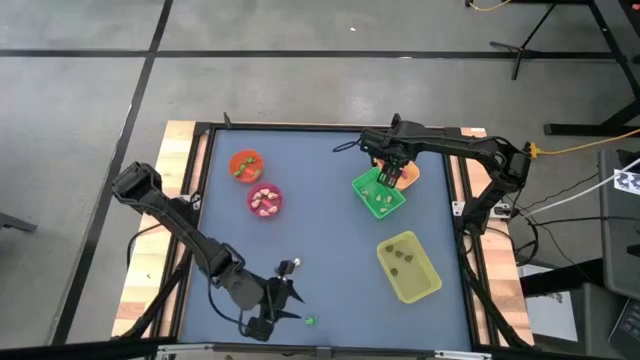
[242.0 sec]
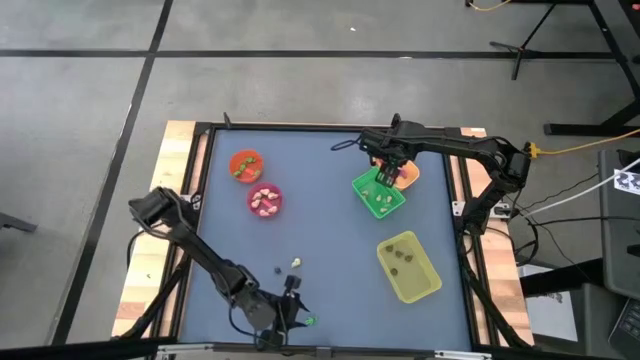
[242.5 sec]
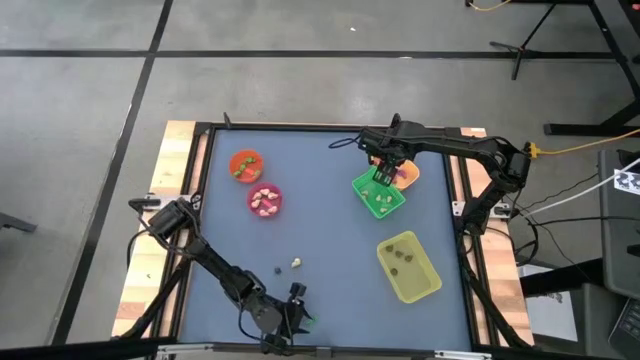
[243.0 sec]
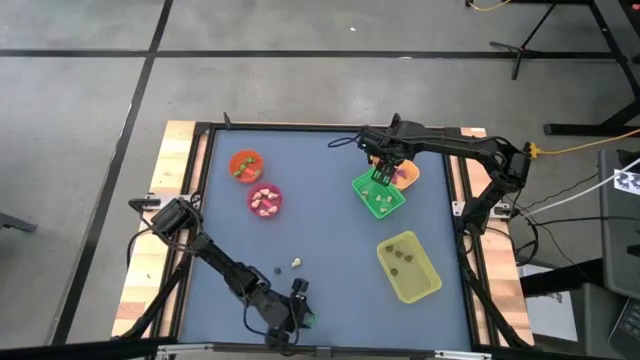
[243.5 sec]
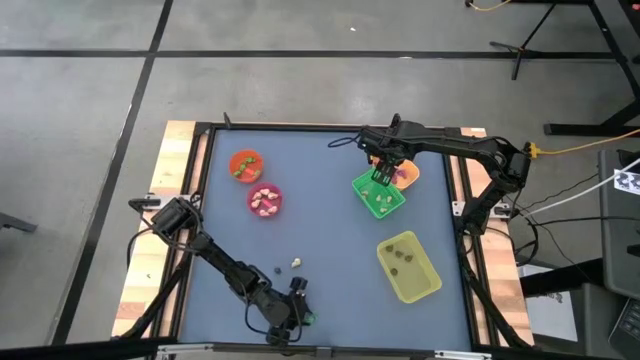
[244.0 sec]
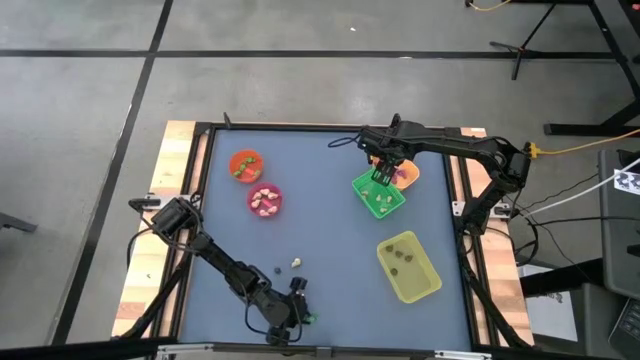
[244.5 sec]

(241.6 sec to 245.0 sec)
Task: Sort Halloween decoration
Put the green skeleton toy into the orange bin

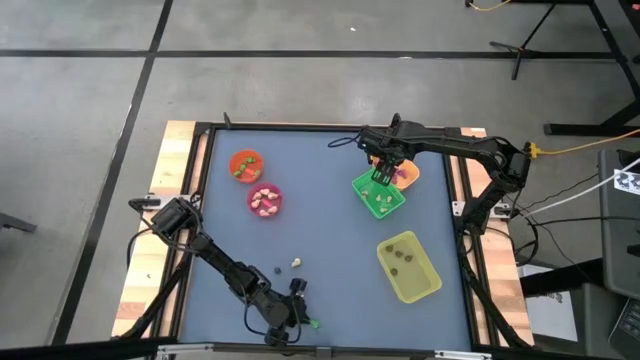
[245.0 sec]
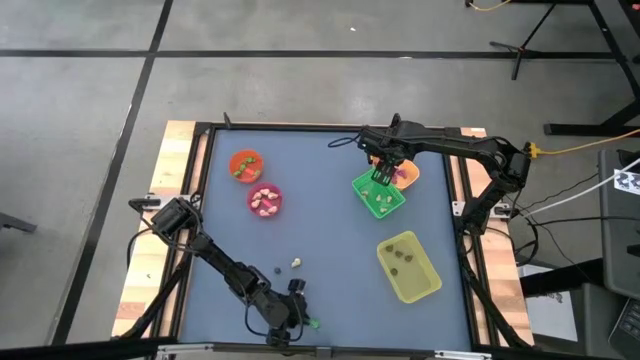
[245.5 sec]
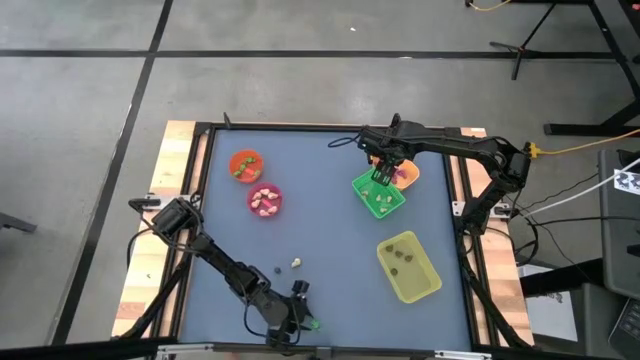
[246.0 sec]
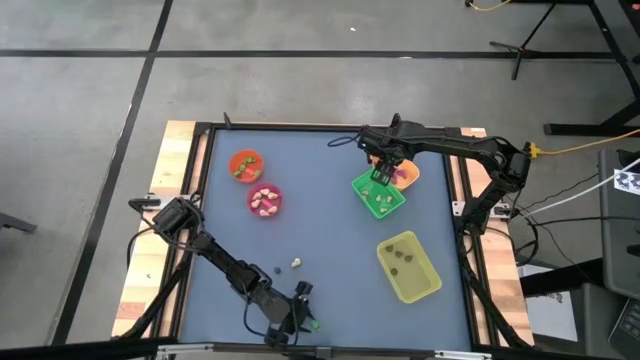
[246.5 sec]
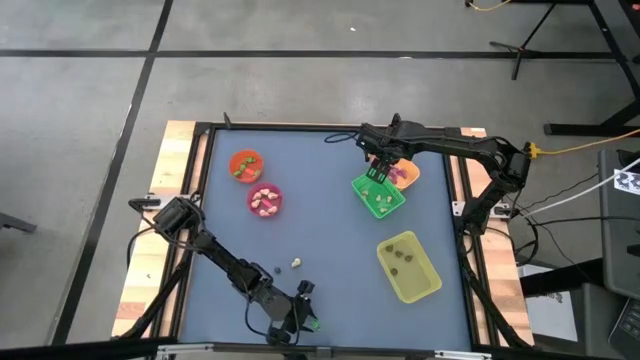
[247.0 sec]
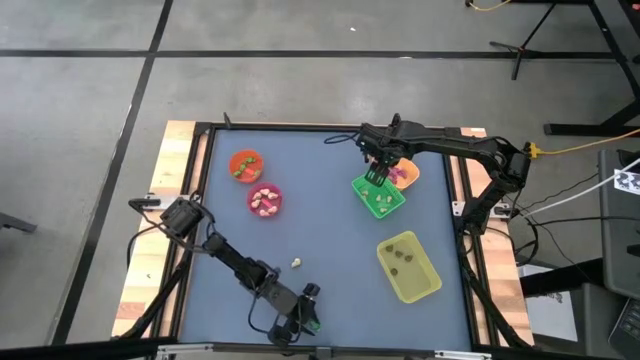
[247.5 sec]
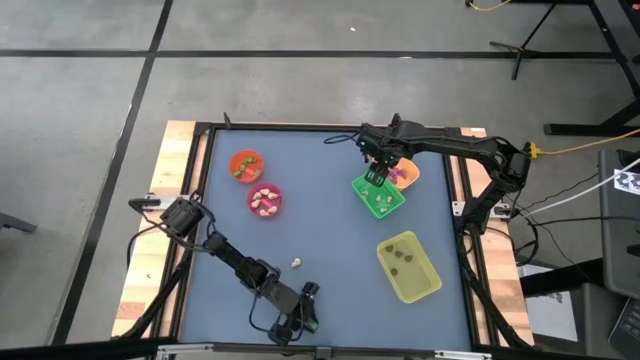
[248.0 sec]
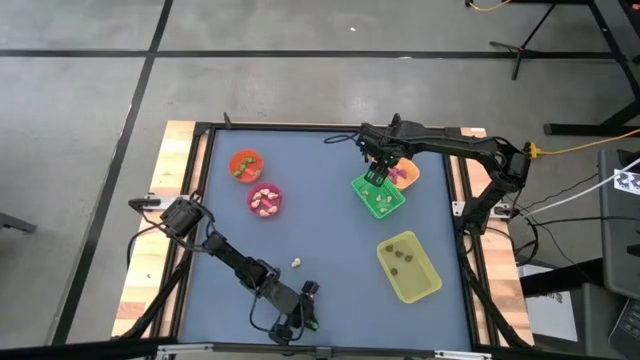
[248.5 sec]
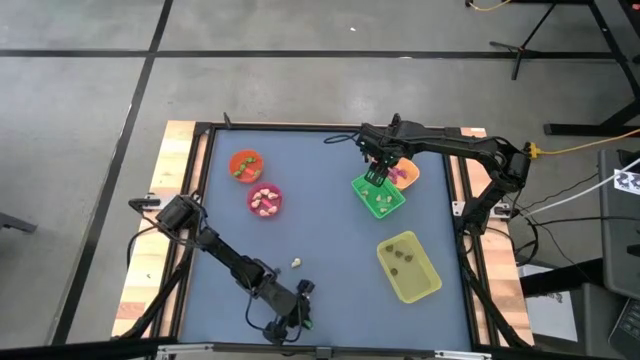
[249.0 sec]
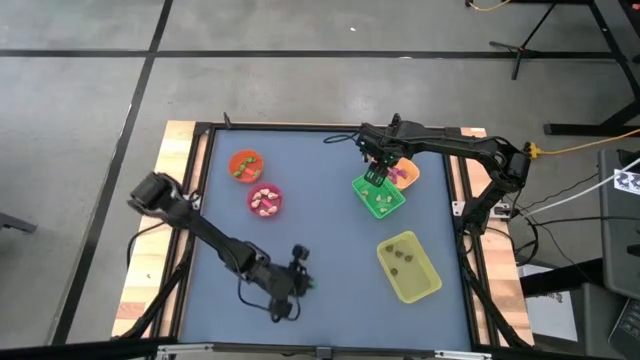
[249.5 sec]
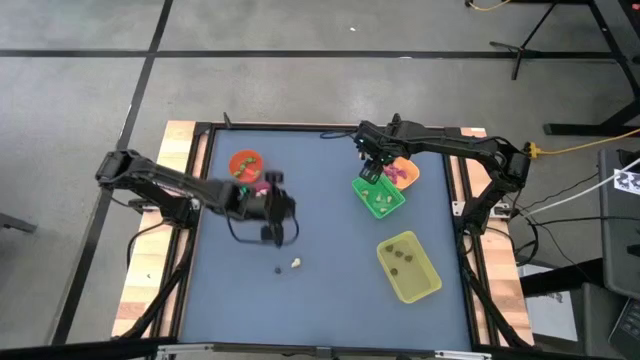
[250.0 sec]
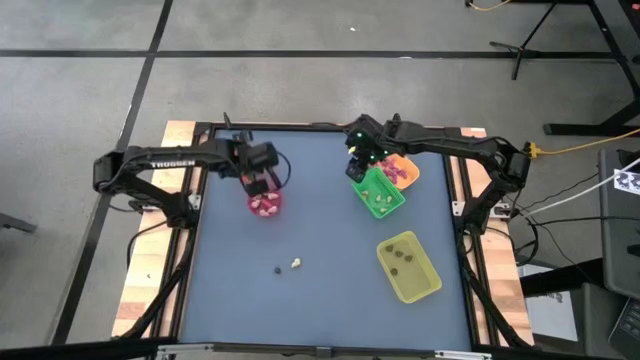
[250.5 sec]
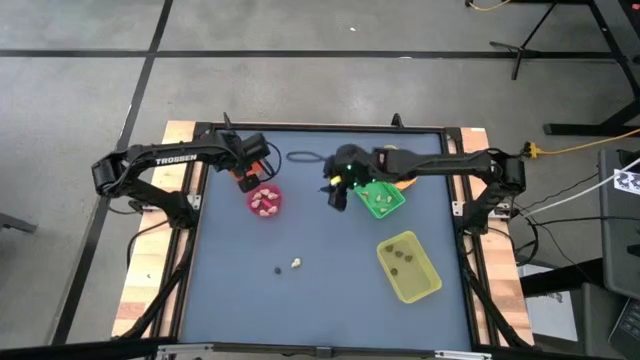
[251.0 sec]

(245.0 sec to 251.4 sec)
Put the green skeleton toy into the orange bin

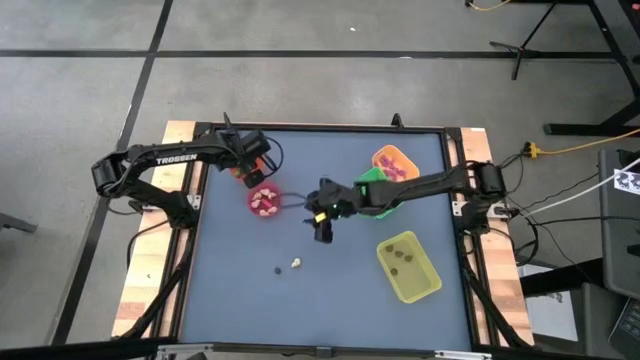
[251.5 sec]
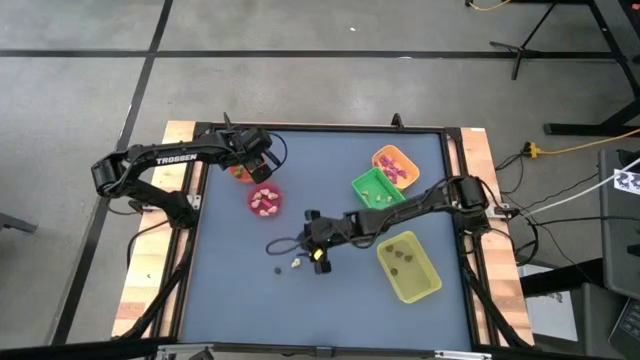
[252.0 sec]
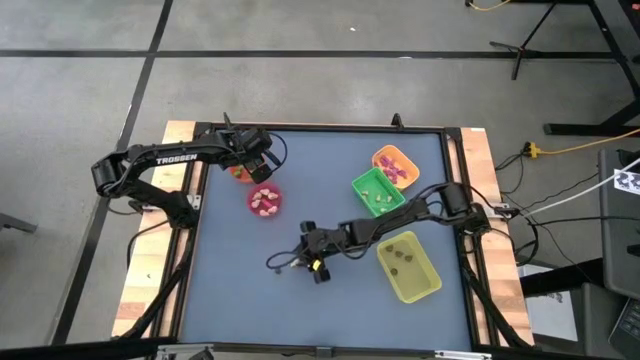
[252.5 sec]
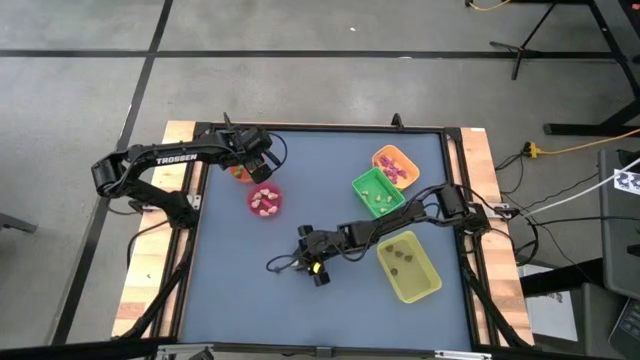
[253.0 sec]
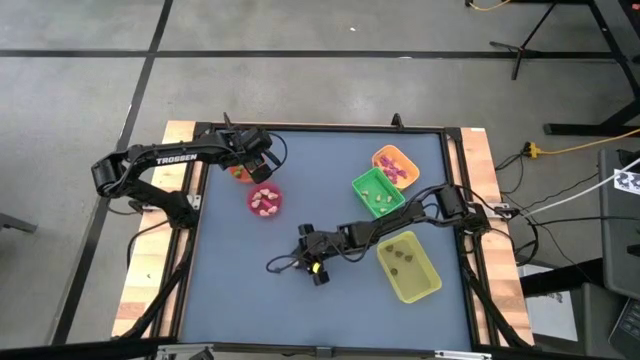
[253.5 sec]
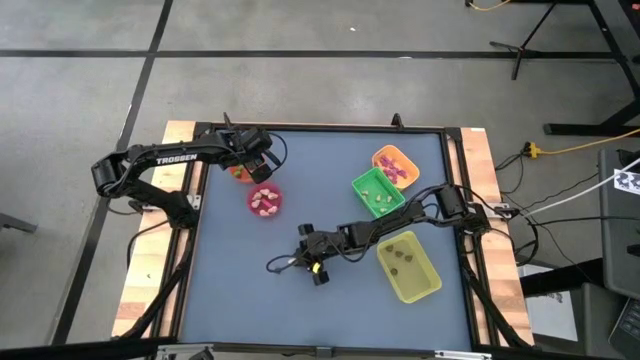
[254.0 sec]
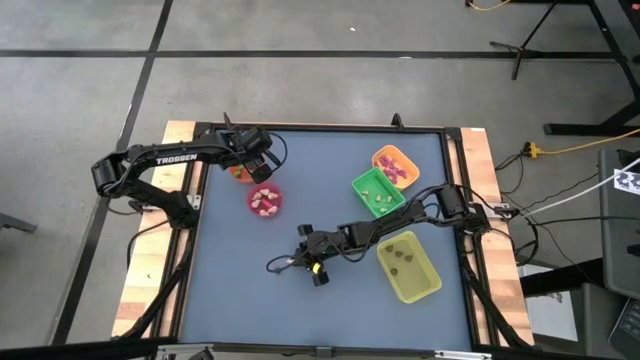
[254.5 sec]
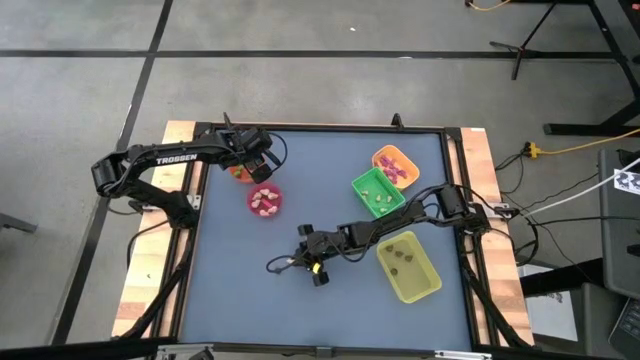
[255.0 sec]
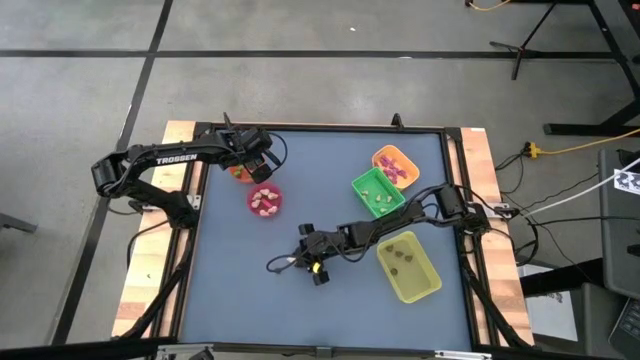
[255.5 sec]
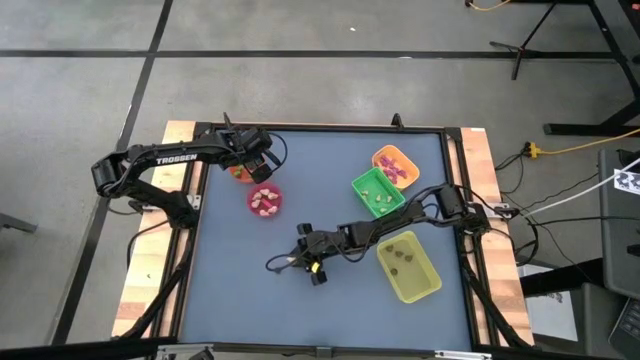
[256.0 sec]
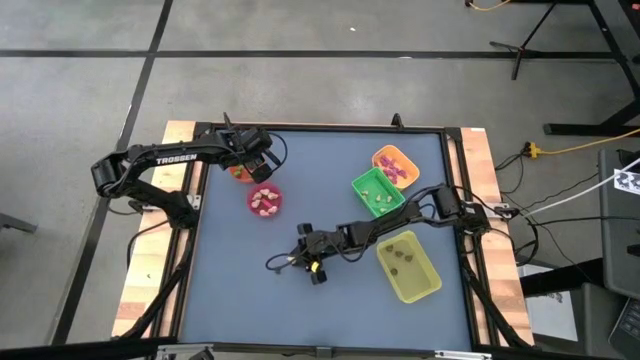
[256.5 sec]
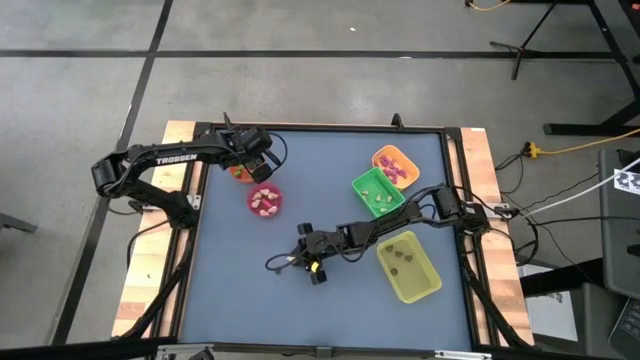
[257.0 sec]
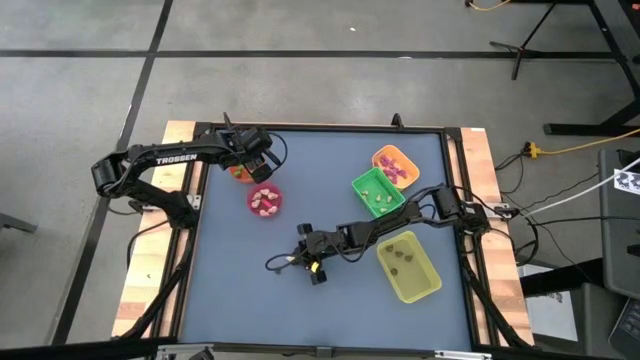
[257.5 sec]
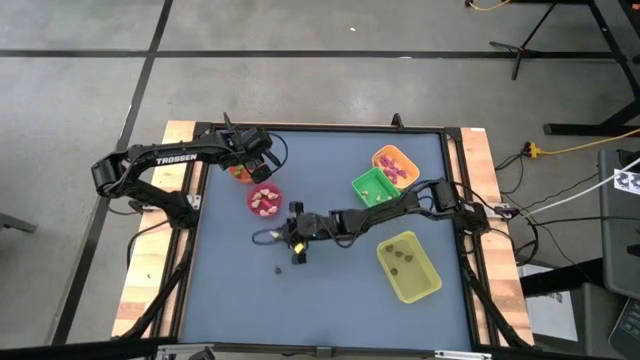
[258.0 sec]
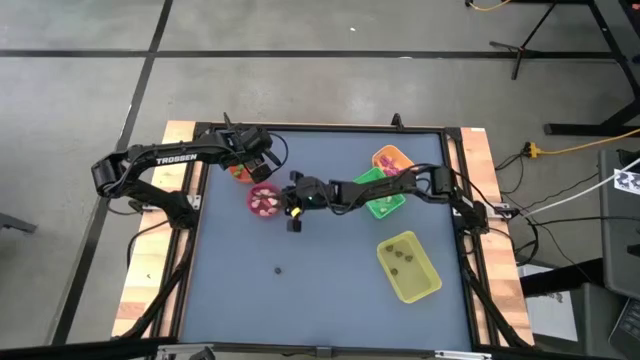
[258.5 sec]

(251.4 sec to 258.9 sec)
Put the white skull toy into the pink bin

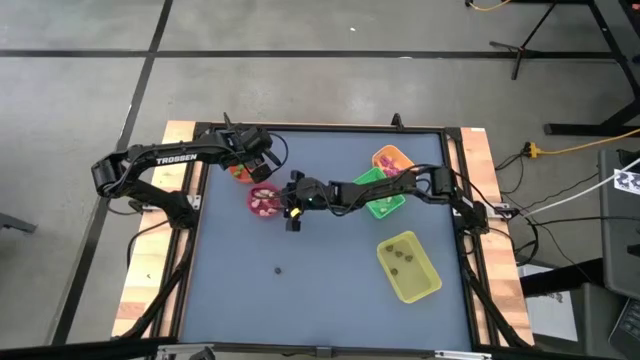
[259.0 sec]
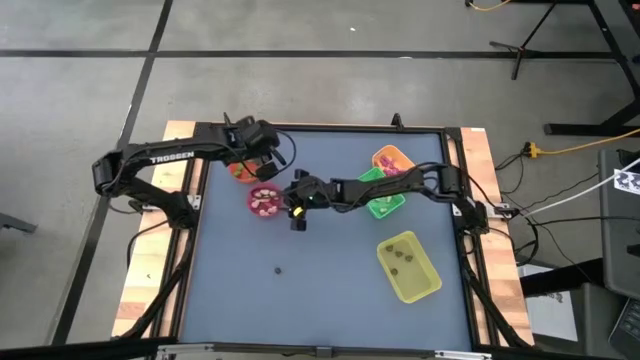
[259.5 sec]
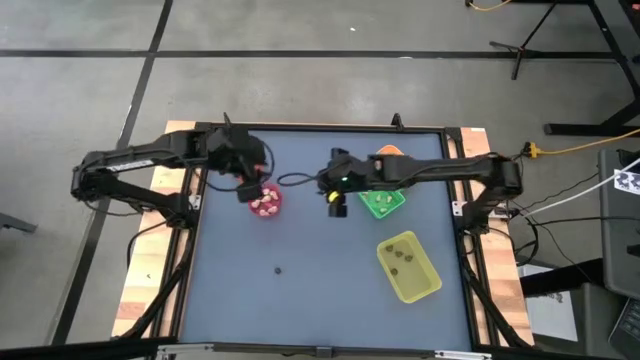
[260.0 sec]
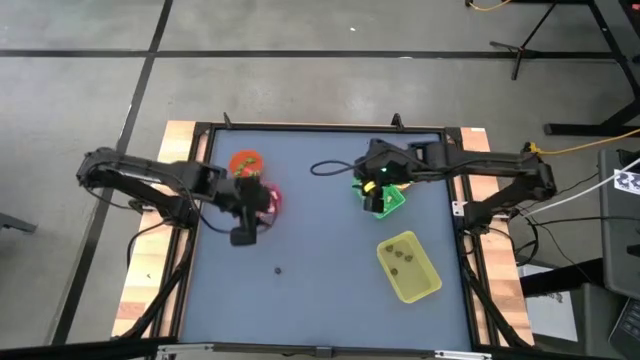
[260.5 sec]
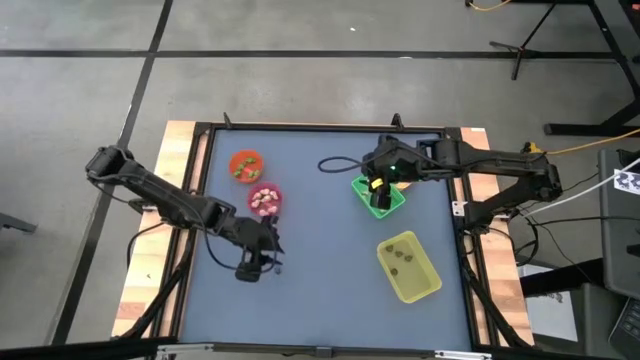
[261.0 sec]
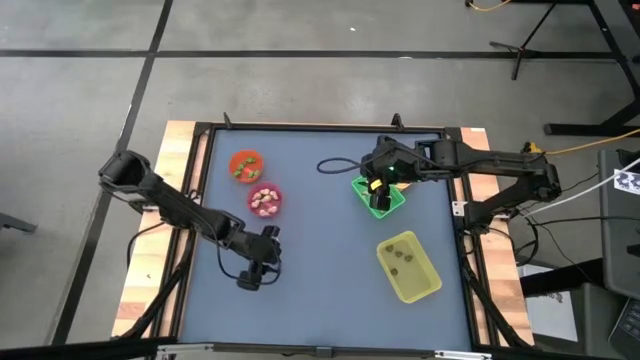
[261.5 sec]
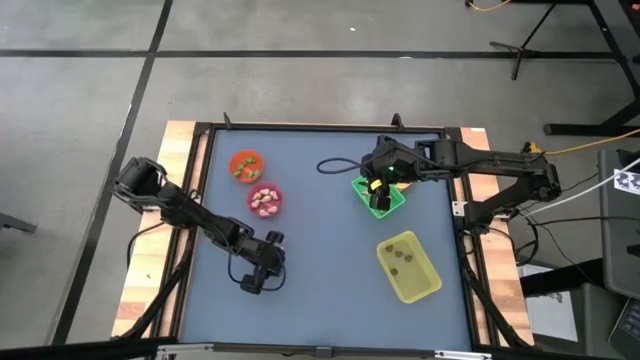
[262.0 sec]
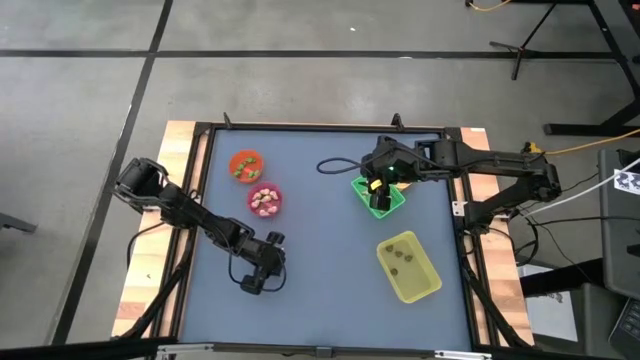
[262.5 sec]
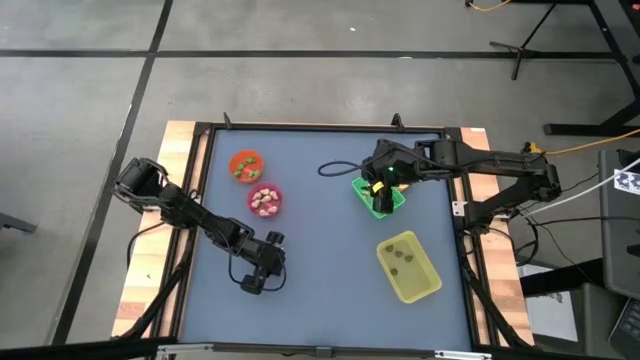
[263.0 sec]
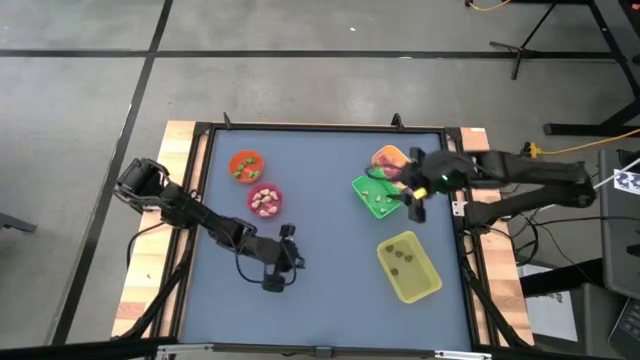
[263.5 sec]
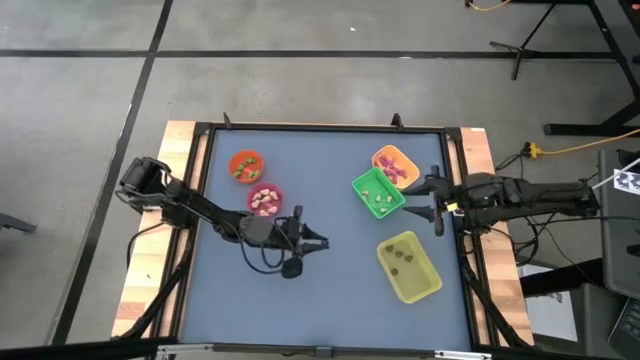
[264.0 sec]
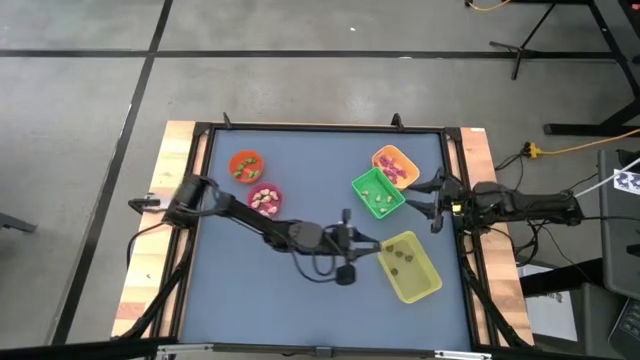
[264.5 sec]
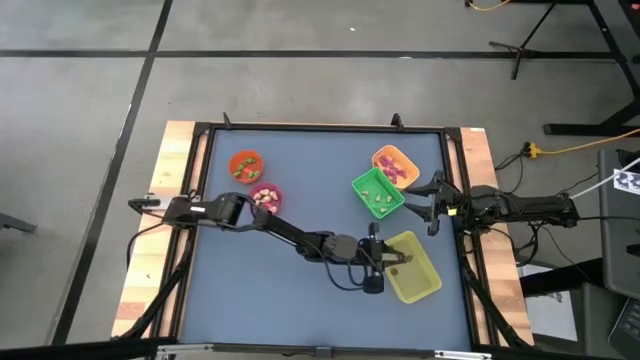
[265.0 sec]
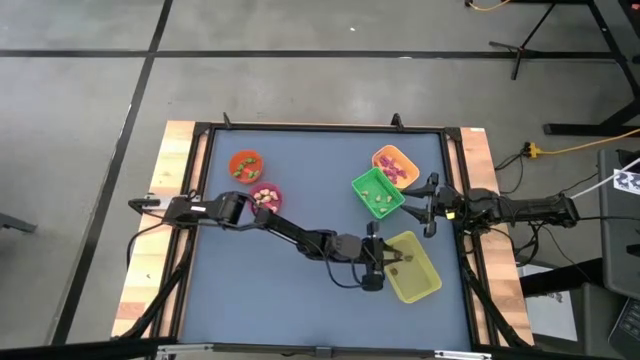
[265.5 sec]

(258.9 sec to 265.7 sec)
Put the white skull toy into the pink bin
